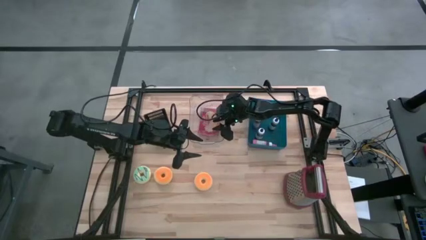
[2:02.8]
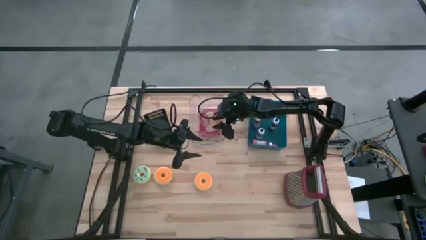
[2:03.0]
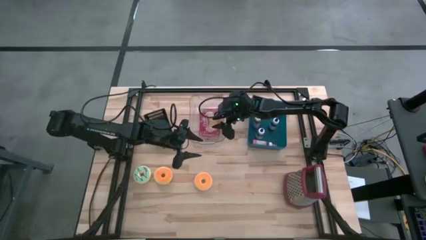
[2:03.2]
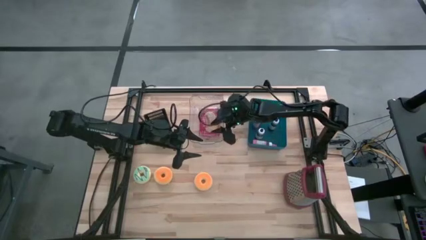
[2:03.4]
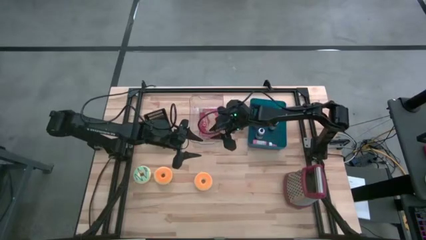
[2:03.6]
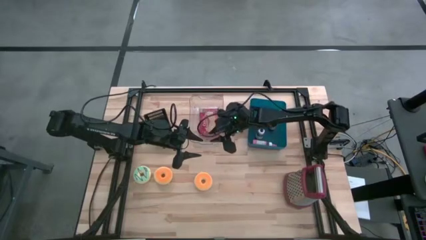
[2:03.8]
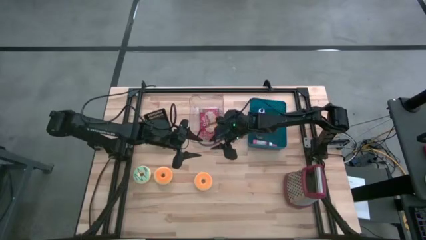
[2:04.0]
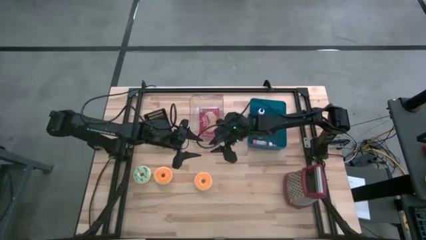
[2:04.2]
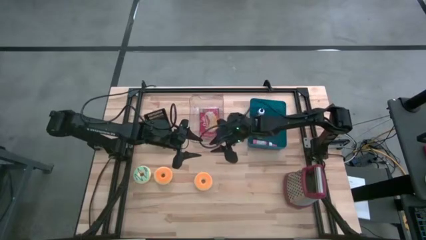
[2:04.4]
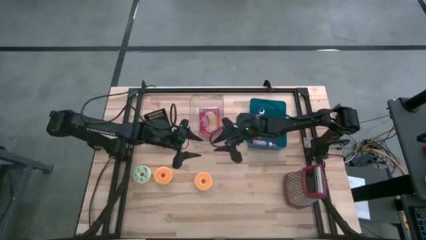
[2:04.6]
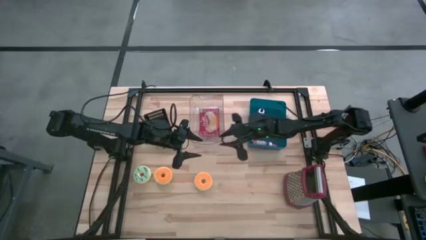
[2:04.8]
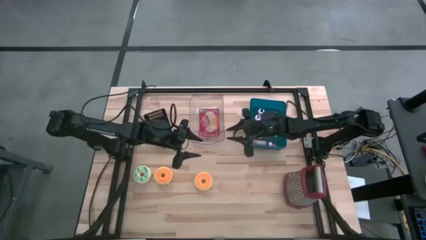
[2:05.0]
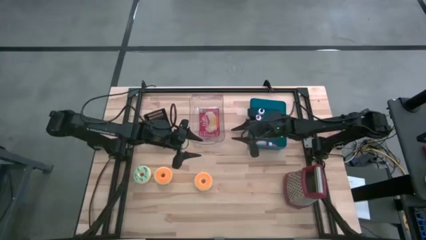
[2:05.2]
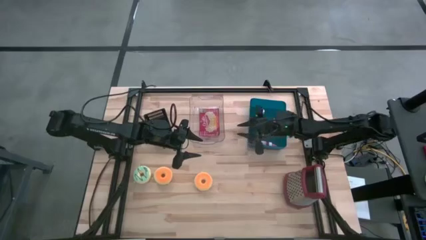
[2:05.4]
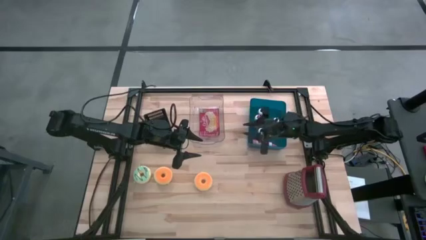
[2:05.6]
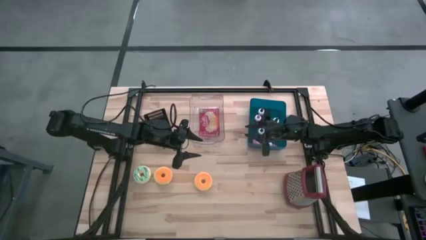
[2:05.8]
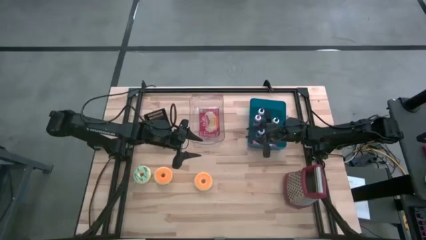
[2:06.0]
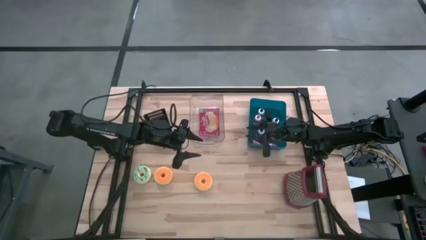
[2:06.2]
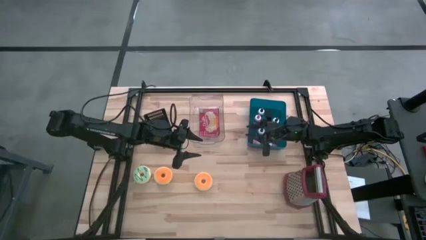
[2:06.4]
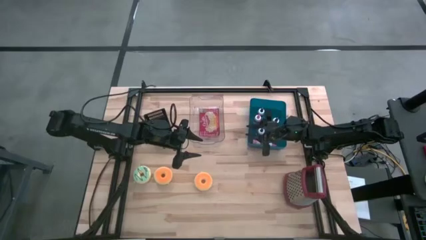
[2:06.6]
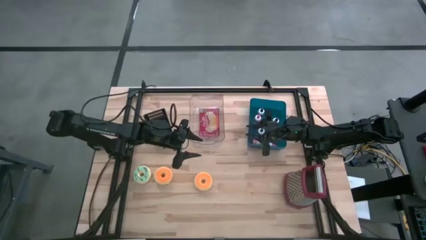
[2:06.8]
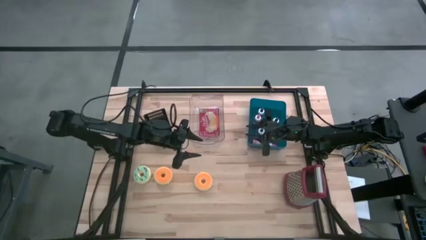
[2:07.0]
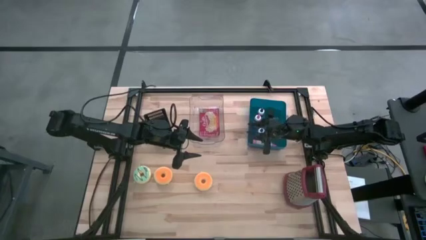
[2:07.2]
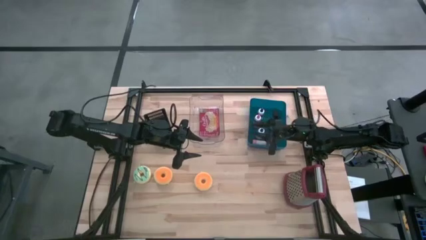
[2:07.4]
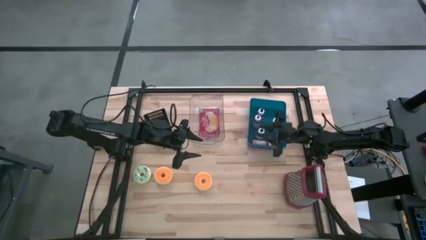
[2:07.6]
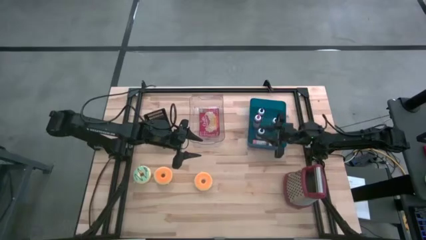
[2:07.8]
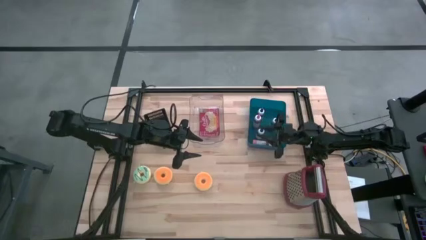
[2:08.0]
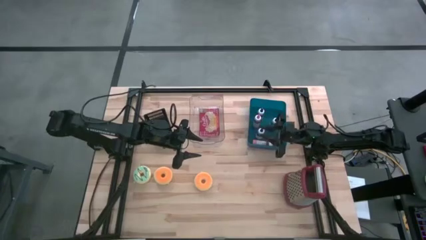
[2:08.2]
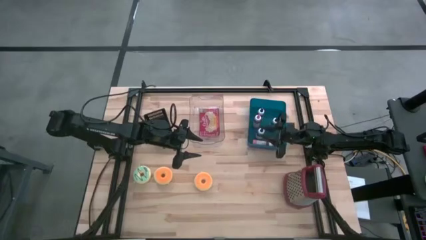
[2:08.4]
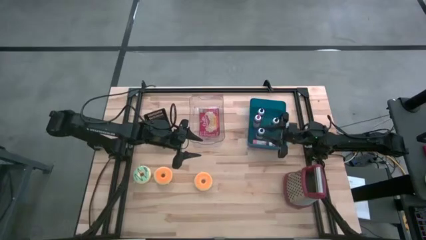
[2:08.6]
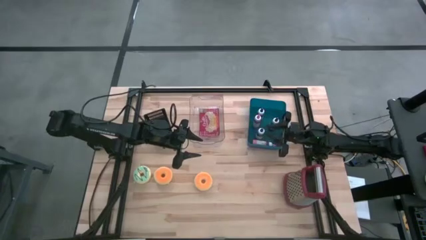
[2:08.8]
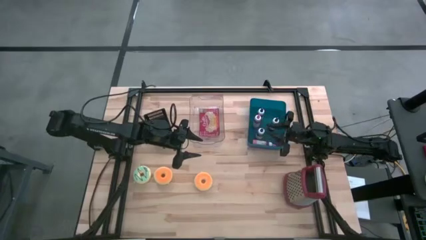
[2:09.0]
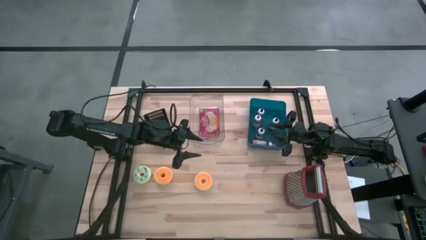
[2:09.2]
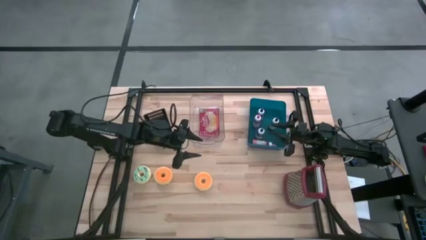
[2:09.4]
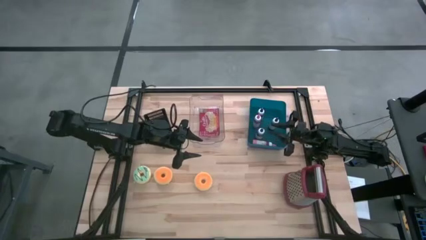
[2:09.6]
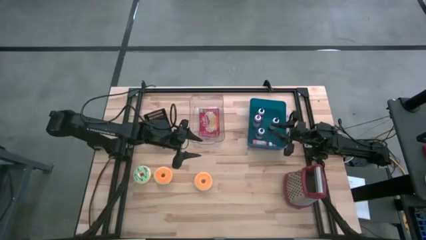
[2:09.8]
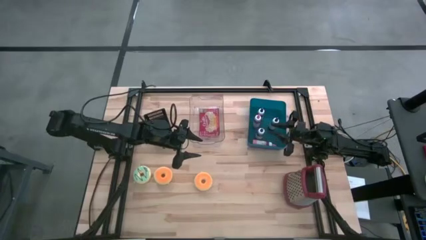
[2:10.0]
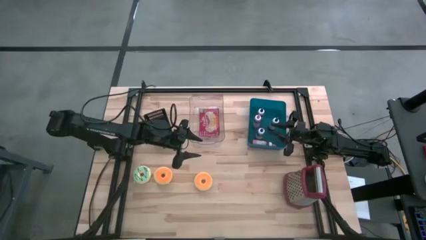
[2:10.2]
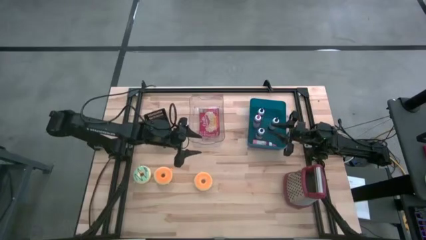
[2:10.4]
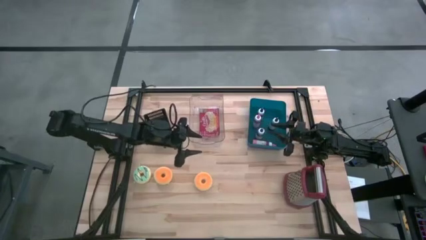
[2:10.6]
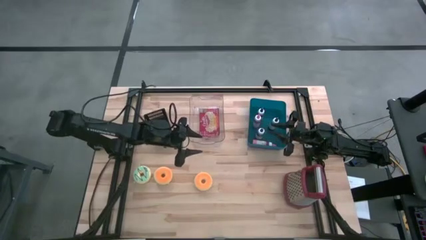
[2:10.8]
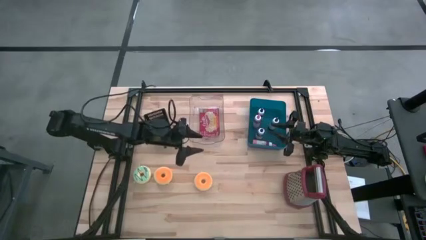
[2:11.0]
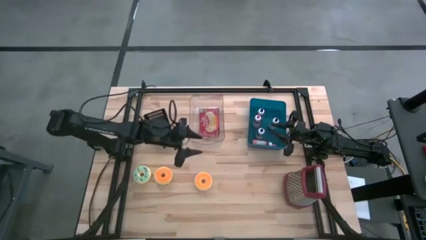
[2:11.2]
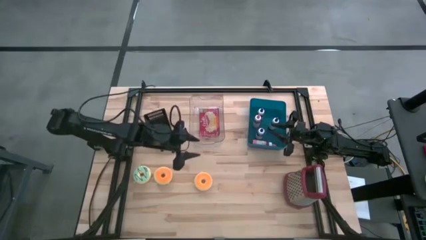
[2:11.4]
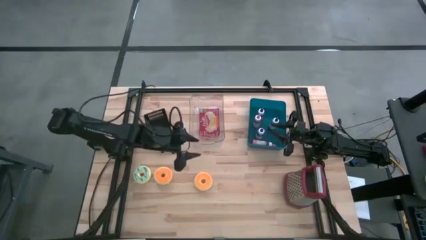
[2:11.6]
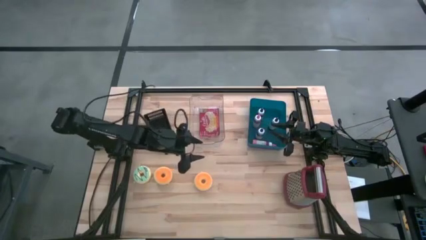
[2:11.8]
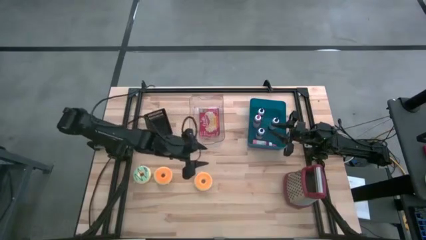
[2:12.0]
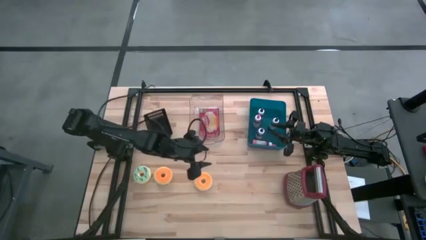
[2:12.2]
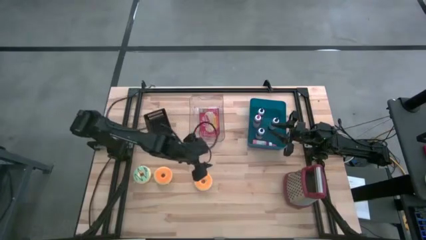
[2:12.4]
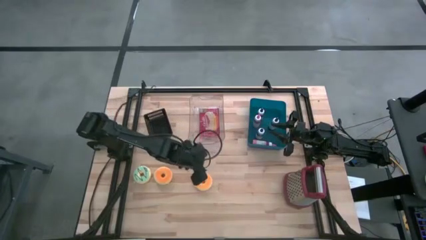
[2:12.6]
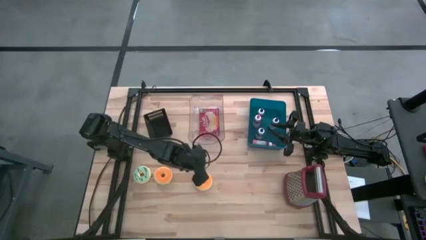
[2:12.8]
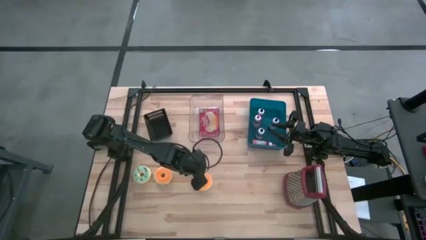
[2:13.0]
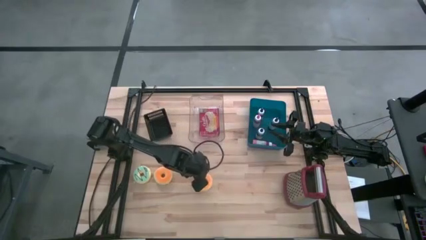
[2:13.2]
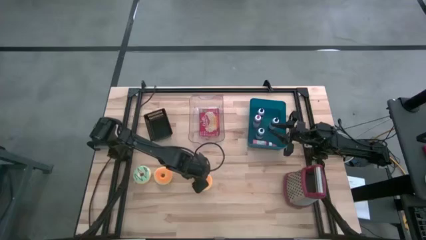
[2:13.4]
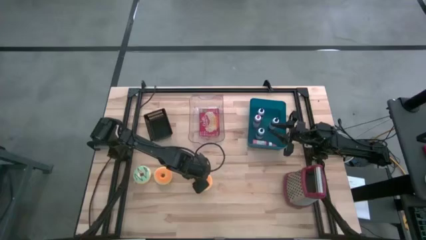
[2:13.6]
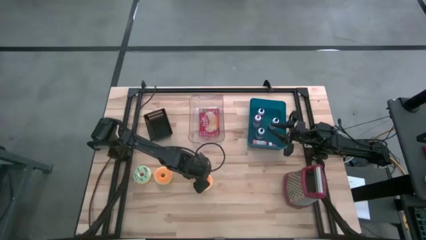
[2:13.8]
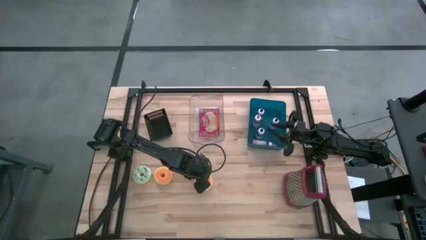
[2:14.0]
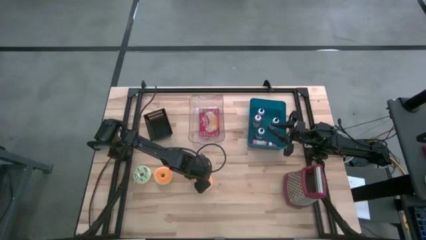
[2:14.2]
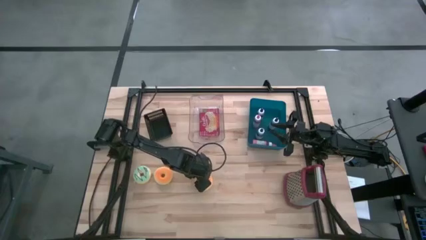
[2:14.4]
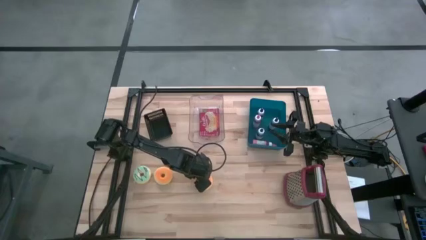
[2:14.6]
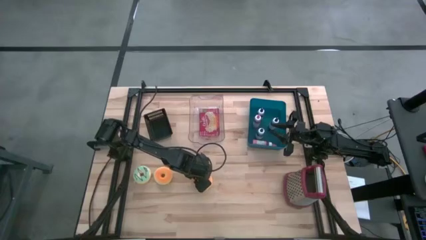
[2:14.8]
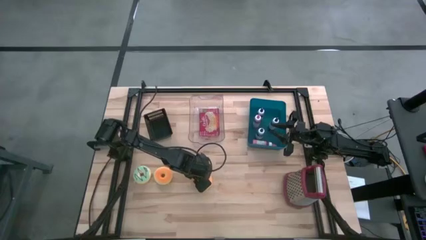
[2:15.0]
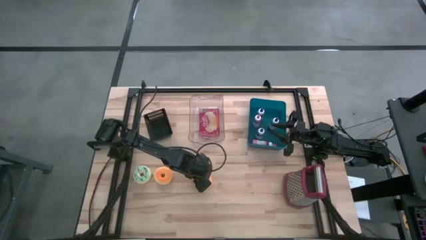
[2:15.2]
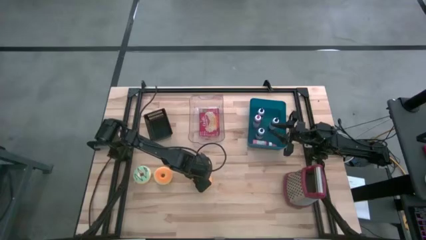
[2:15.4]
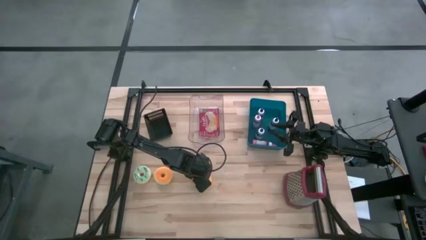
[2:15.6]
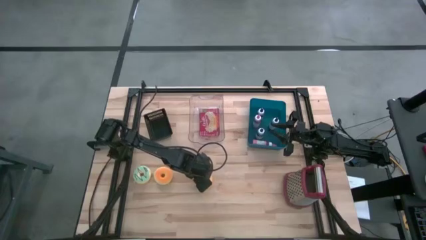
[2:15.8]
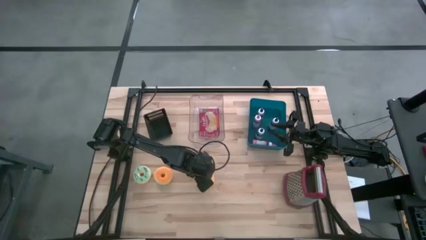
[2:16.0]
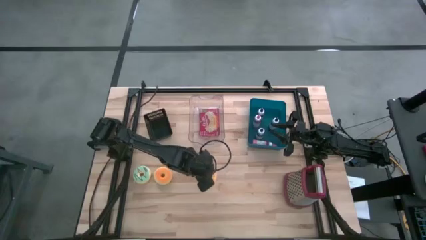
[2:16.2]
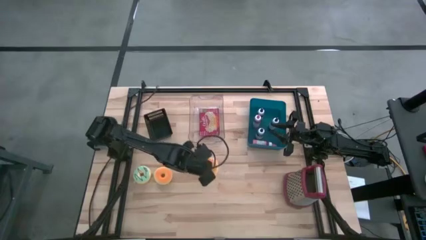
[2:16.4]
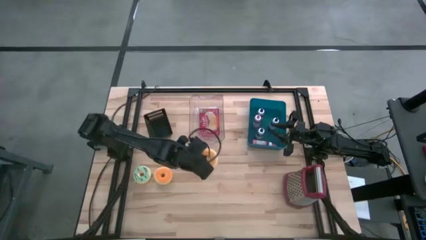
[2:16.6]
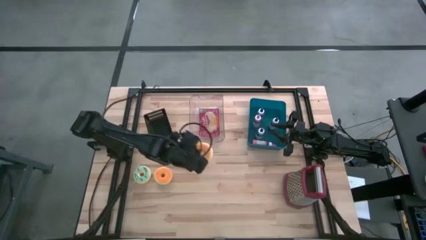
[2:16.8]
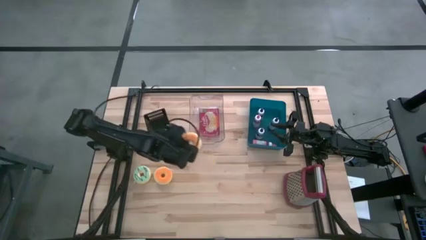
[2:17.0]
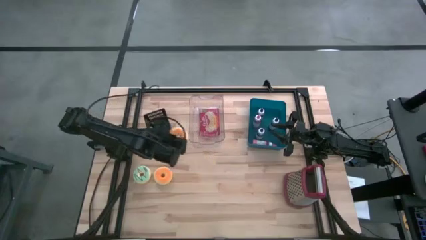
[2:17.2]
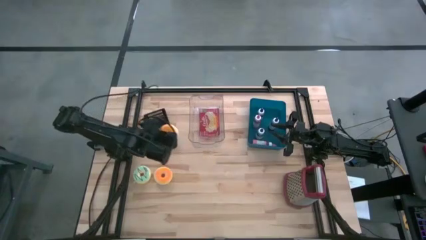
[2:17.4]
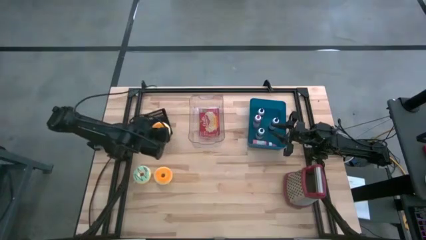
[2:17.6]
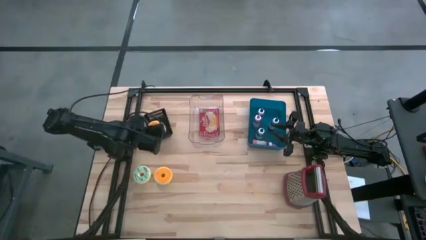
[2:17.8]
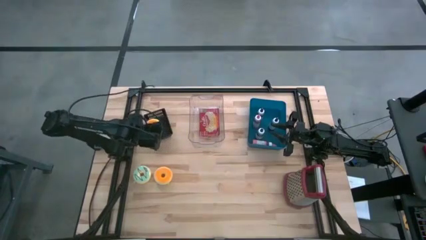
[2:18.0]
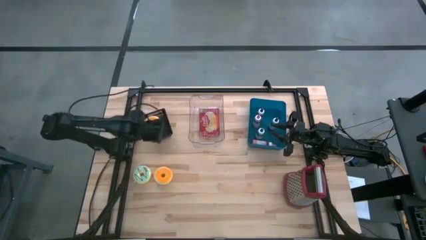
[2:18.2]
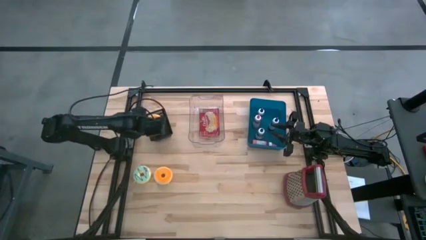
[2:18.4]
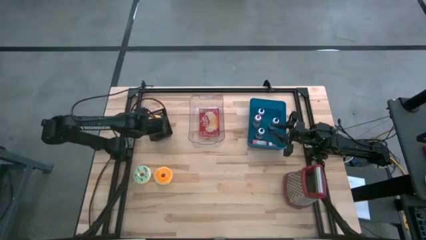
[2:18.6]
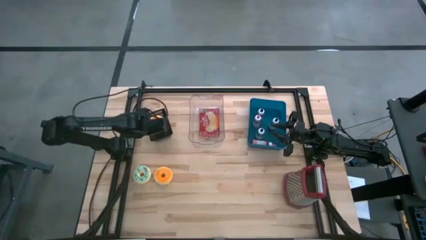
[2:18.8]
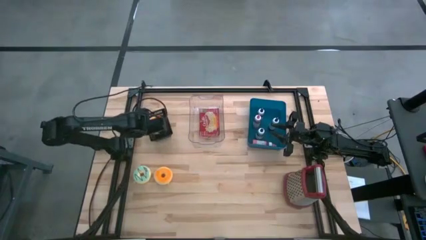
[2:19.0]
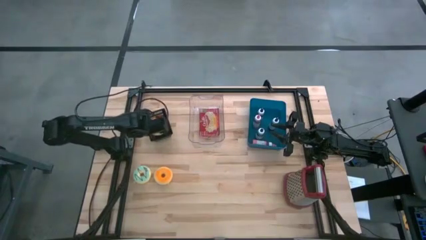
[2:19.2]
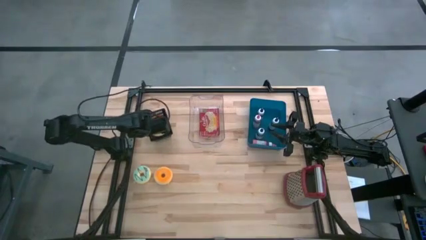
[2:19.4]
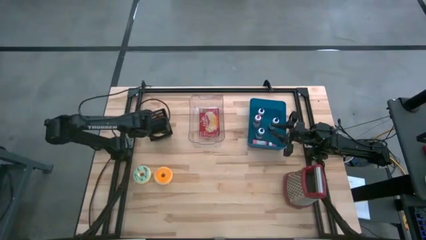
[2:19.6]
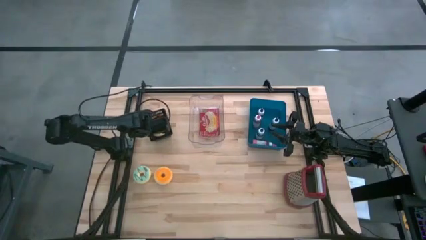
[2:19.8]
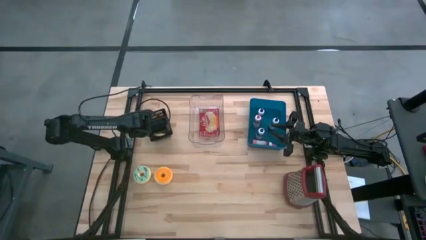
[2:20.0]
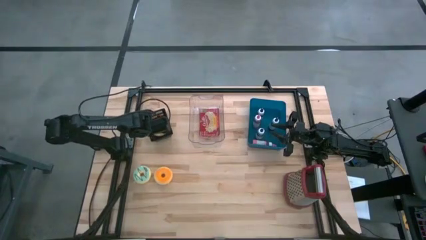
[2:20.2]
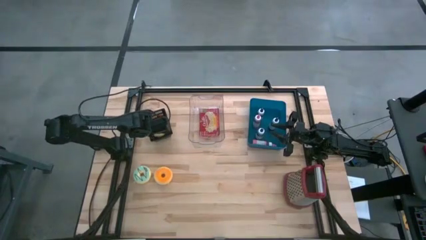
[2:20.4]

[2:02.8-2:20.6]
Task: Pick & Place Food Item
Put the right orange donut into the black bin
